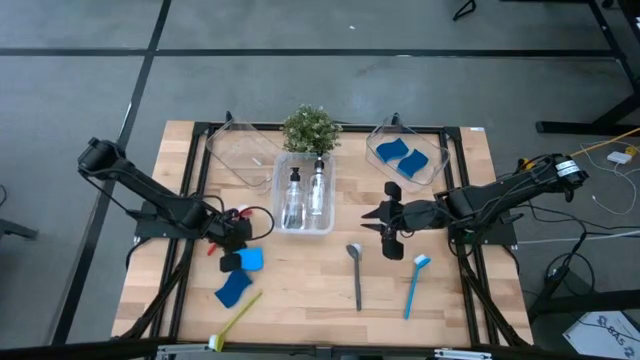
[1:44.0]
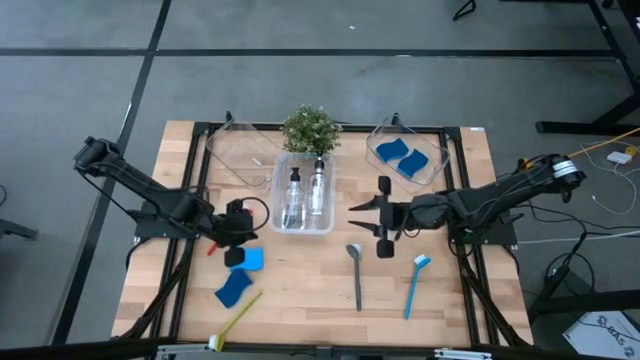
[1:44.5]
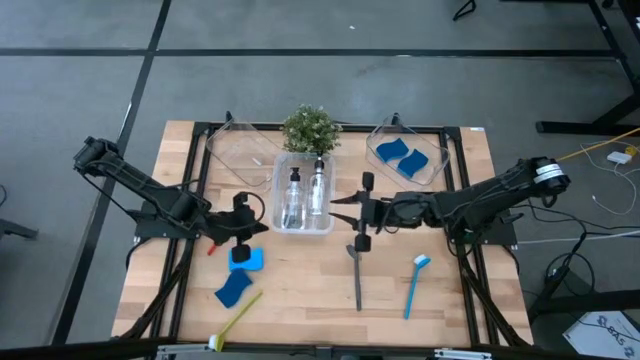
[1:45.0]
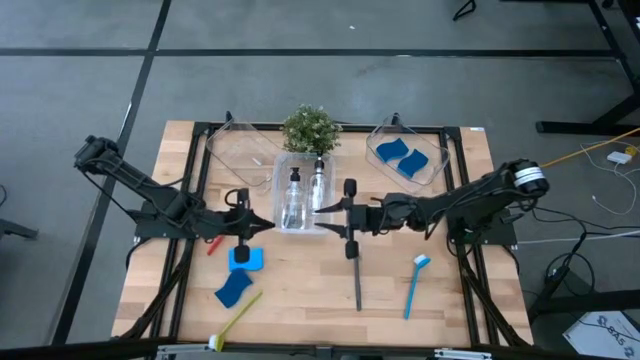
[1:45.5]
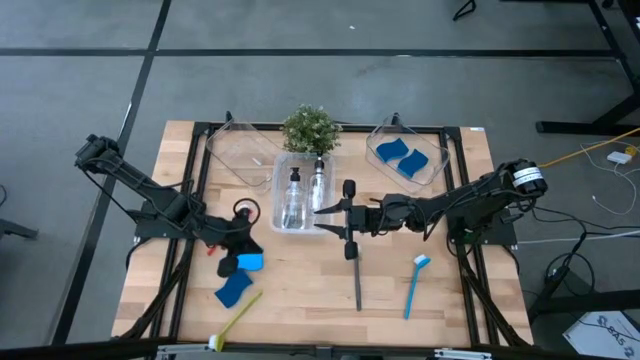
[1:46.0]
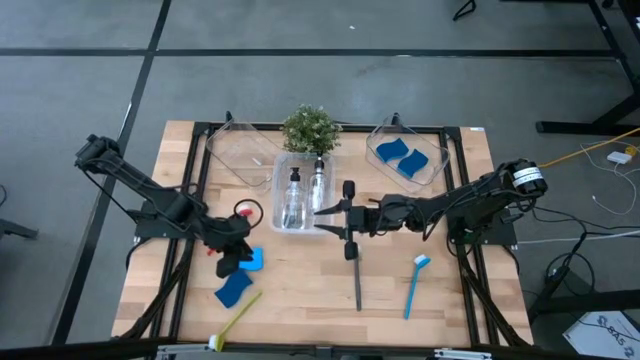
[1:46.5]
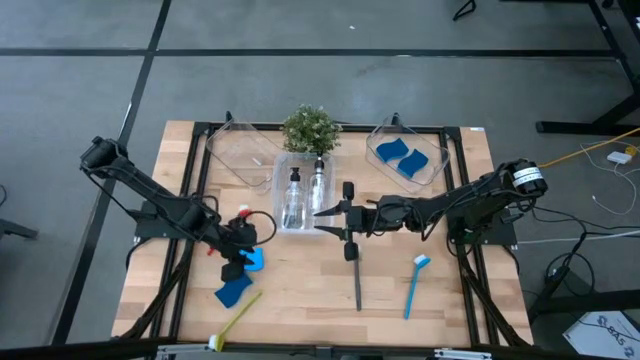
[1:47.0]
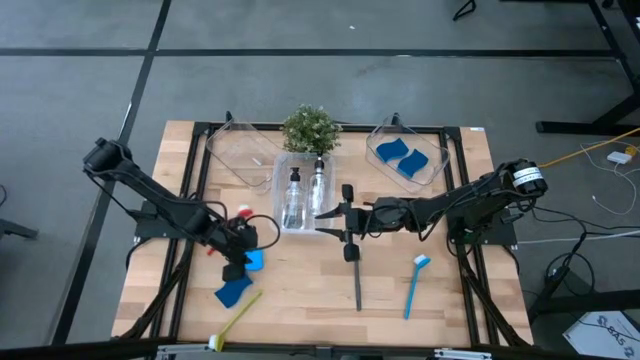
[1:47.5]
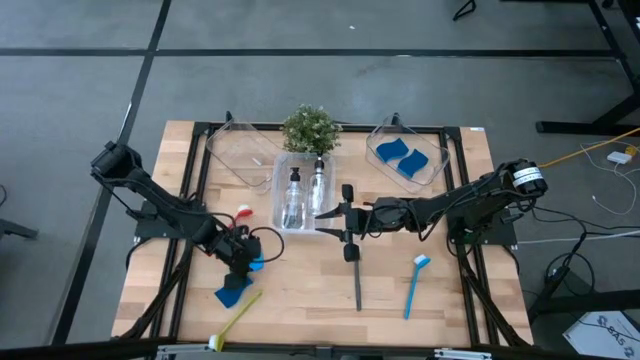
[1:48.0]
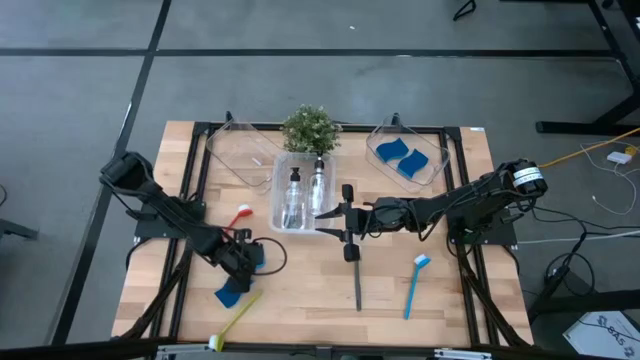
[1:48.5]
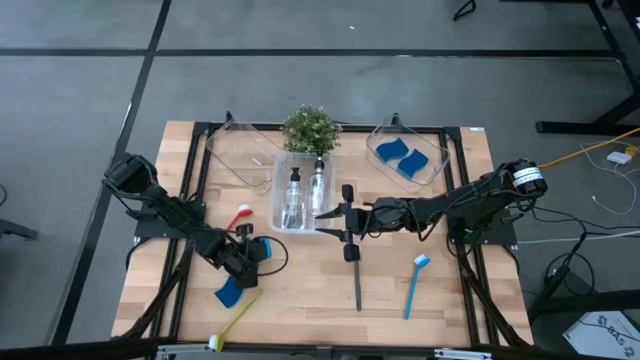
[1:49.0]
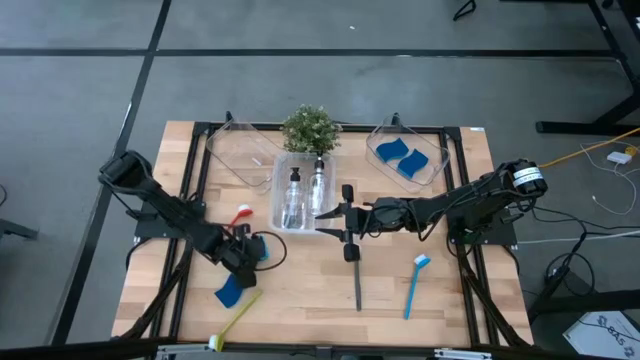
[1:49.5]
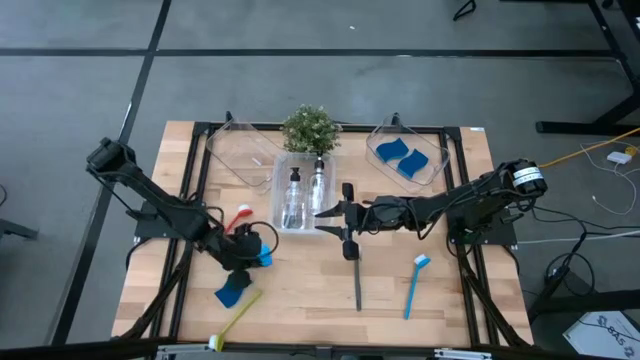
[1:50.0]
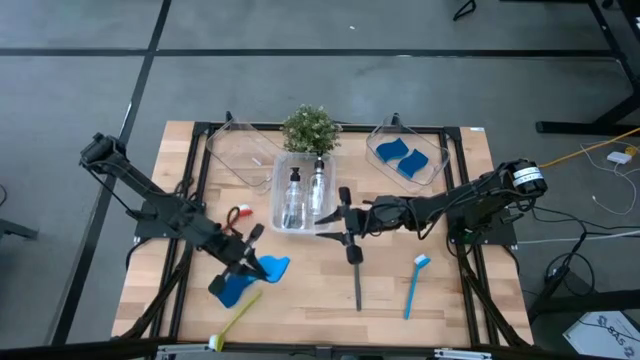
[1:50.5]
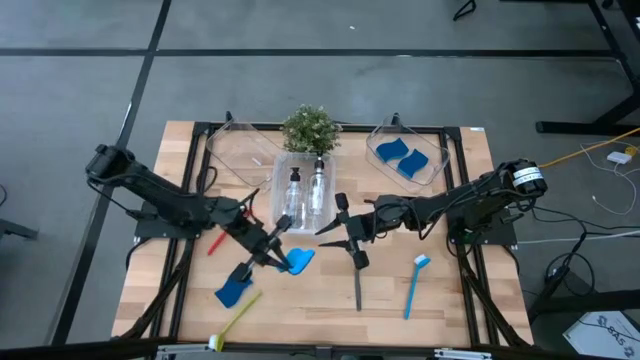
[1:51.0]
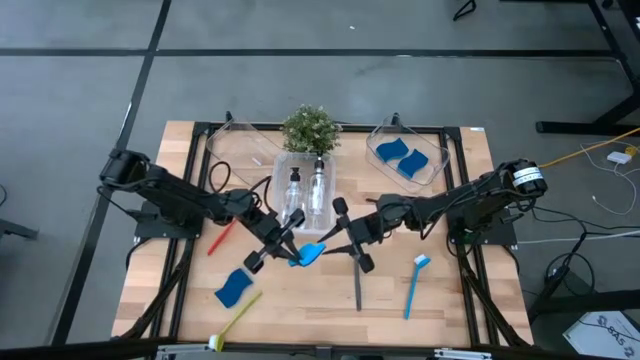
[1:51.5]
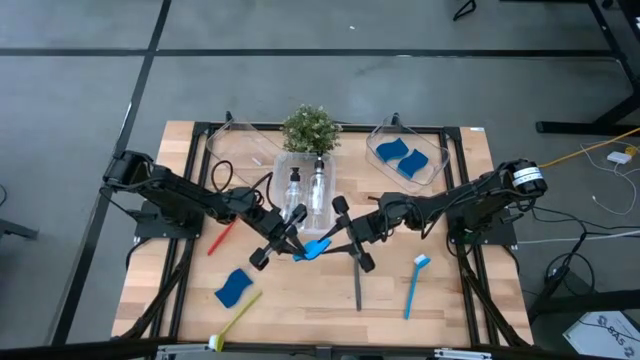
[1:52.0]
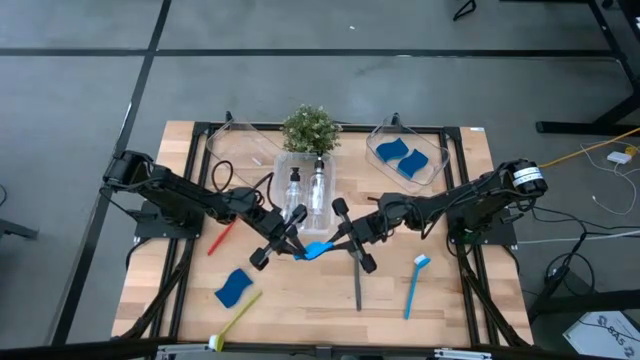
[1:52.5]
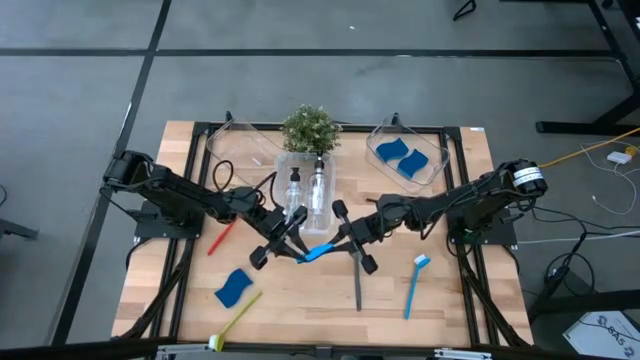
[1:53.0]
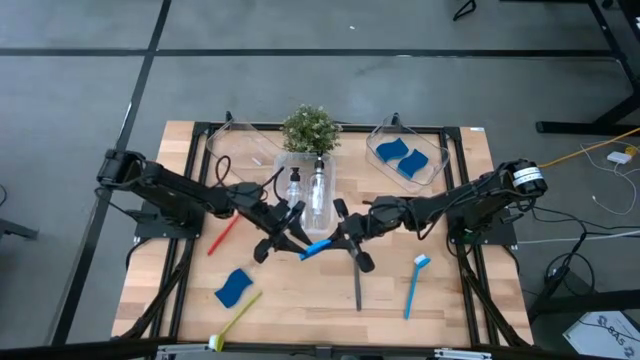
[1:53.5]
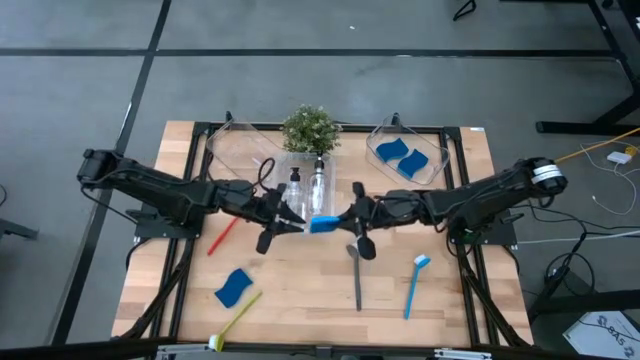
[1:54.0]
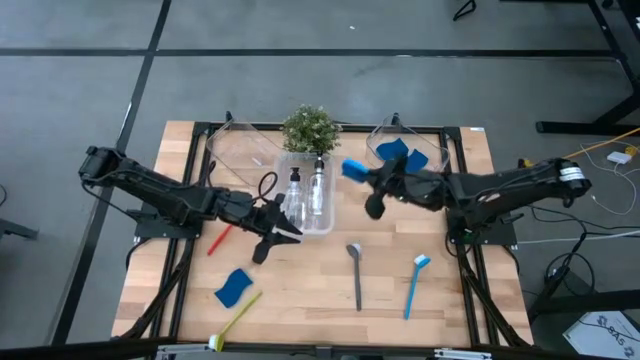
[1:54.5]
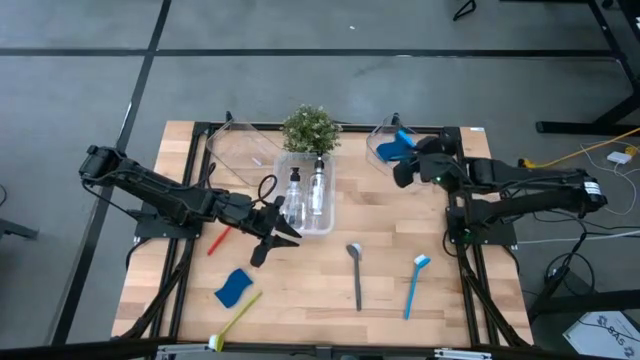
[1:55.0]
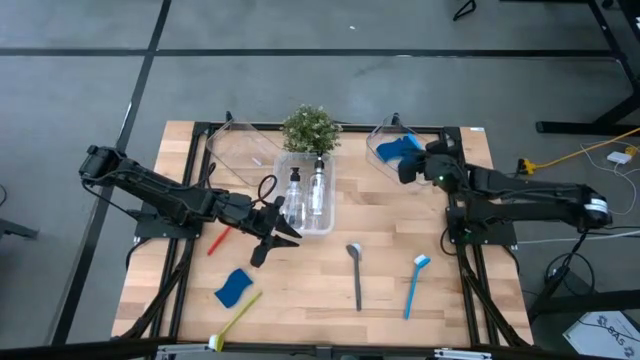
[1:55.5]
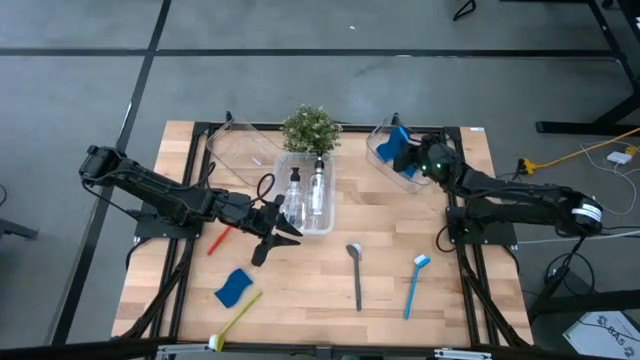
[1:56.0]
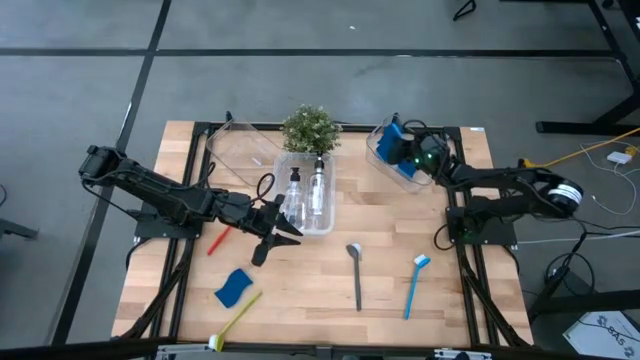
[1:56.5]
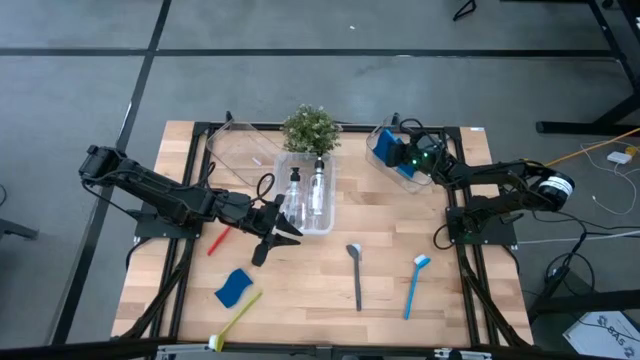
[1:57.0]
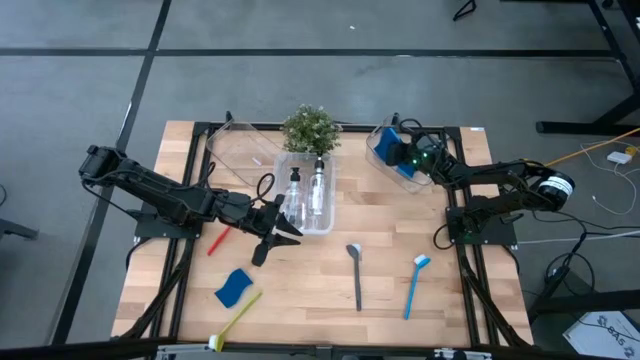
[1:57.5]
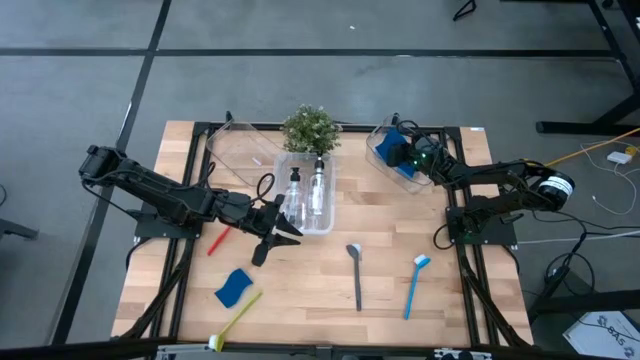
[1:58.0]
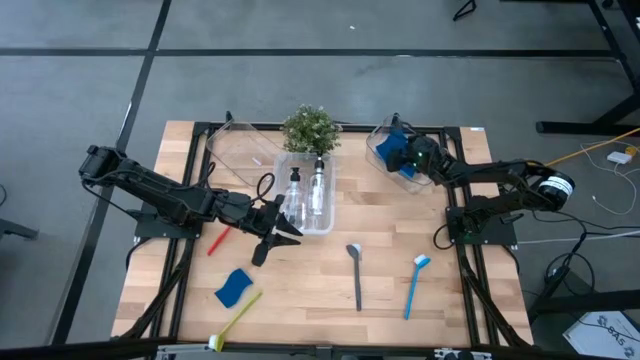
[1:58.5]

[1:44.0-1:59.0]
Task: Pick & Place Kitchen Sink Supplies
Put the blue sponge into the right transparent bin

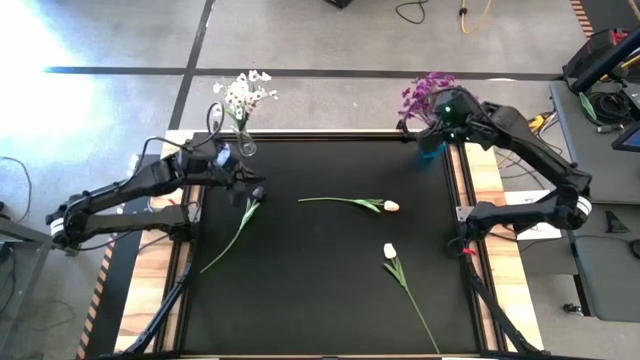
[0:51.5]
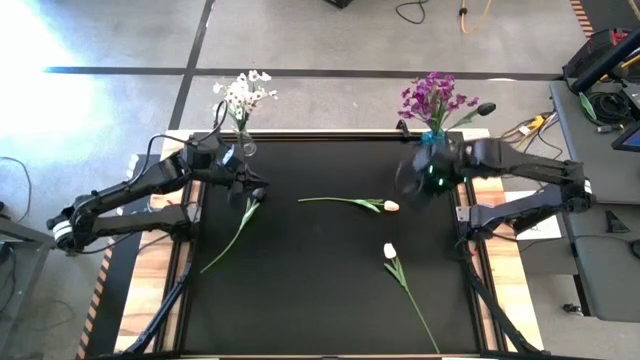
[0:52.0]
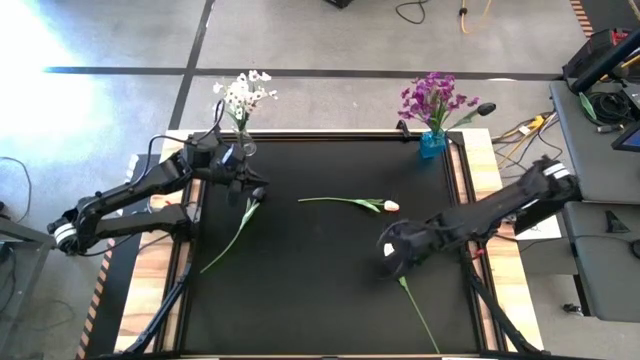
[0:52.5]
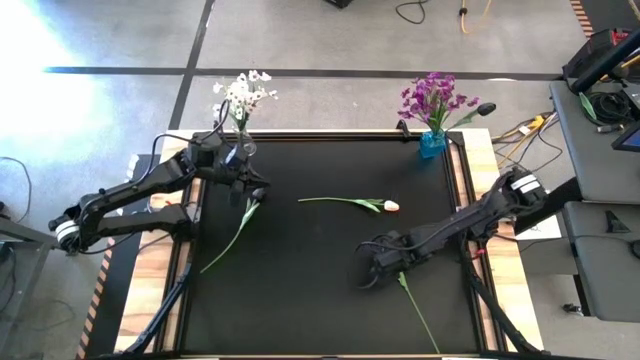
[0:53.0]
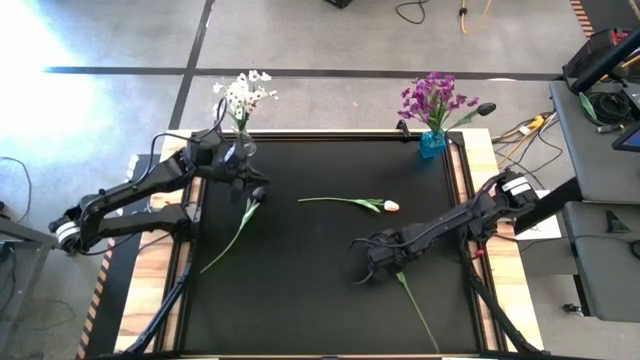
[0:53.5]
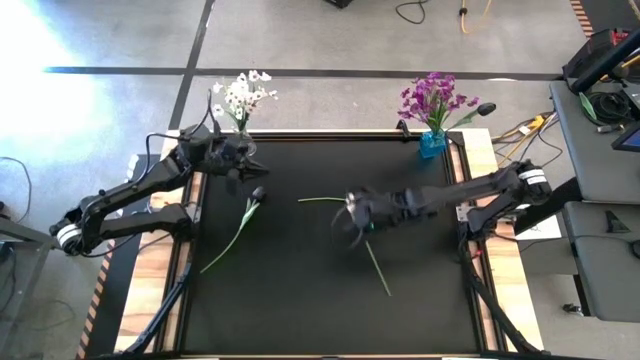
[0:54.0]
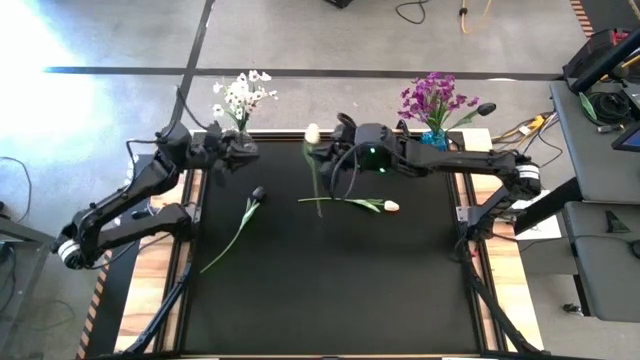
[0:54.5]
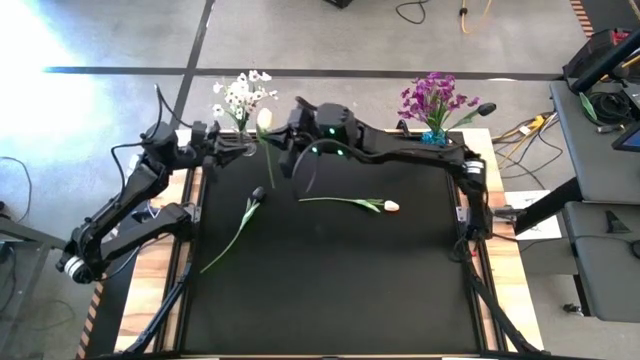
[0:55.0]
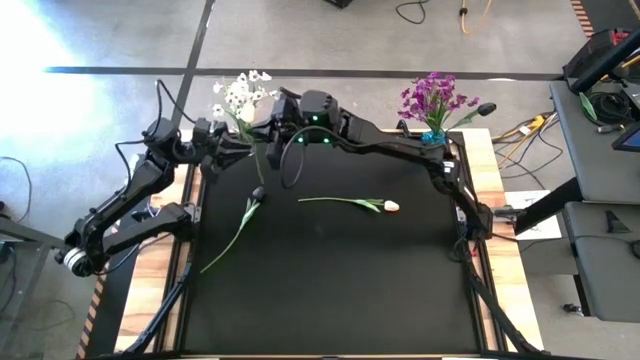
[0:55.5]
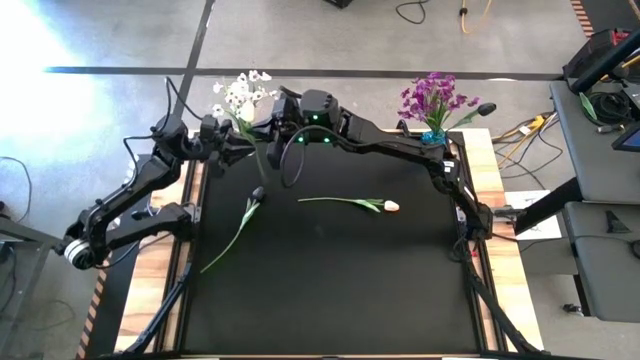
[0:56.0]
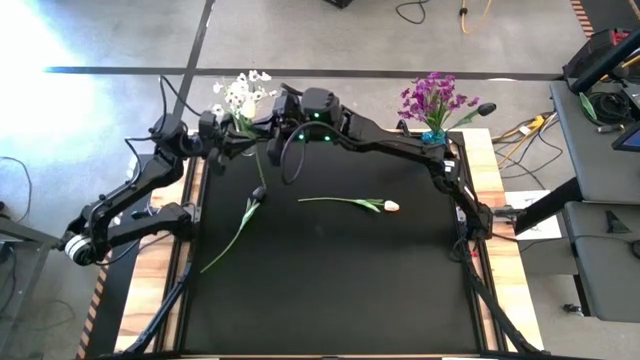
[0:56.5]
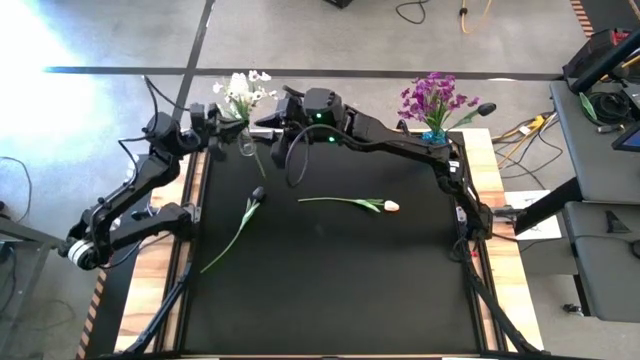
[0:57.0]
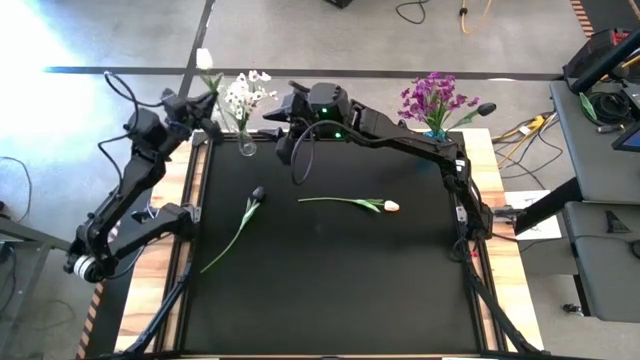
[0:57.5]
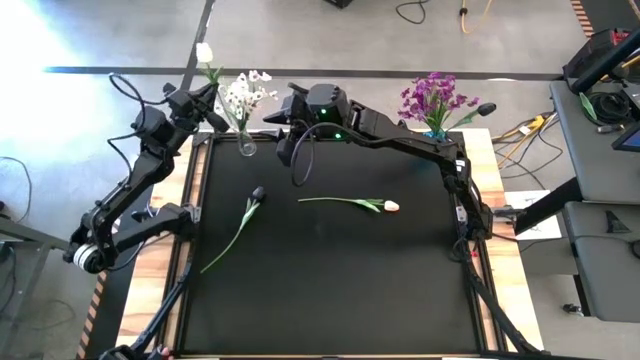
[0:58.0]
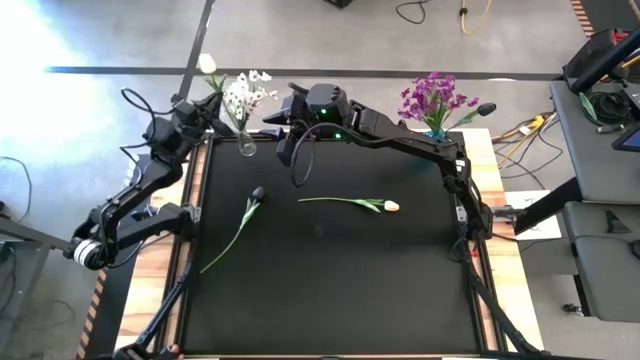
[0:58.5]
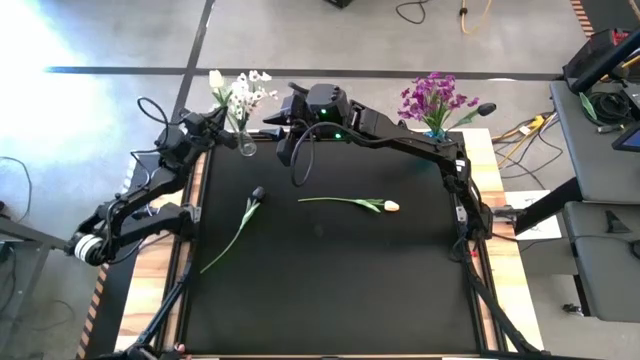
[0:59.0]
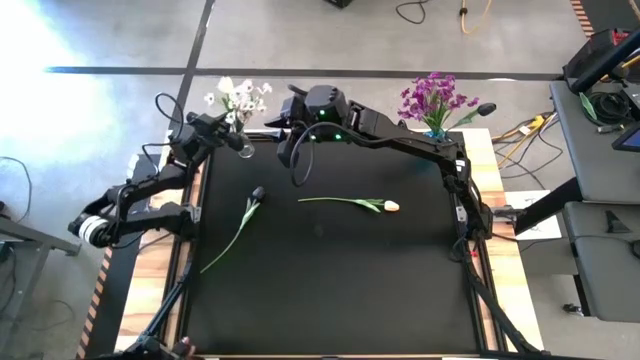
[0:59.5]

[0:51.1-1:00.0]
Task: Sort flowers into vase by color
Put the bottom white flower into the transparent vase
